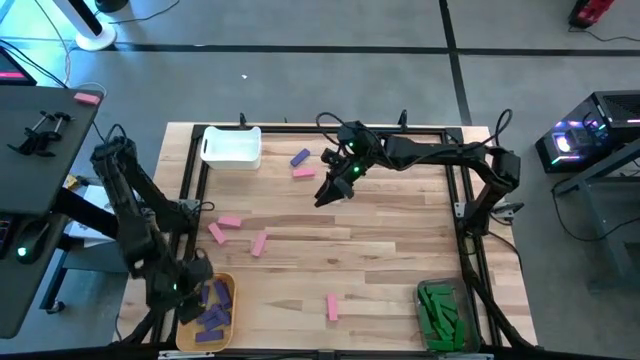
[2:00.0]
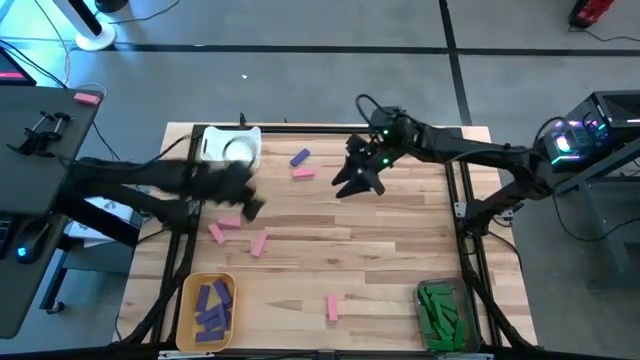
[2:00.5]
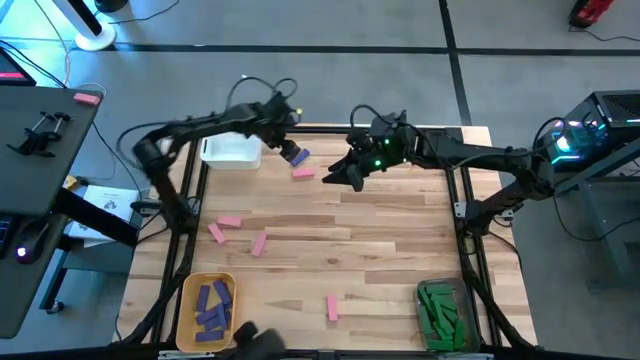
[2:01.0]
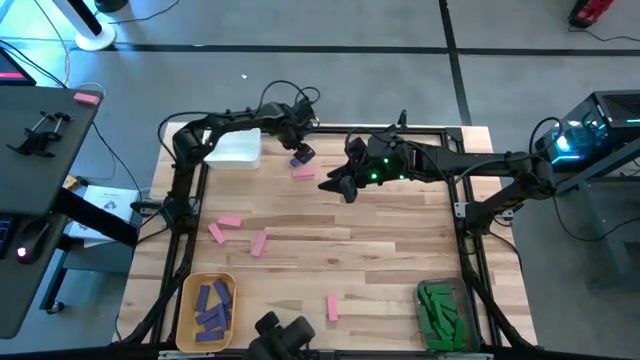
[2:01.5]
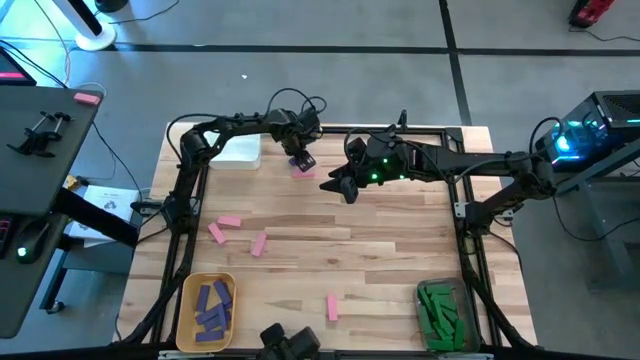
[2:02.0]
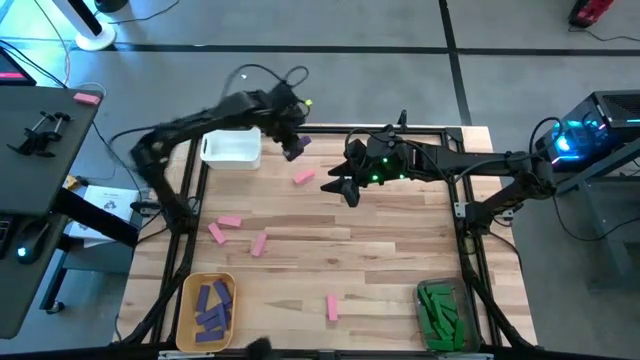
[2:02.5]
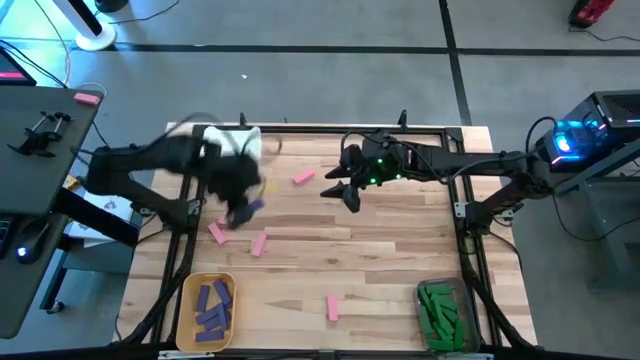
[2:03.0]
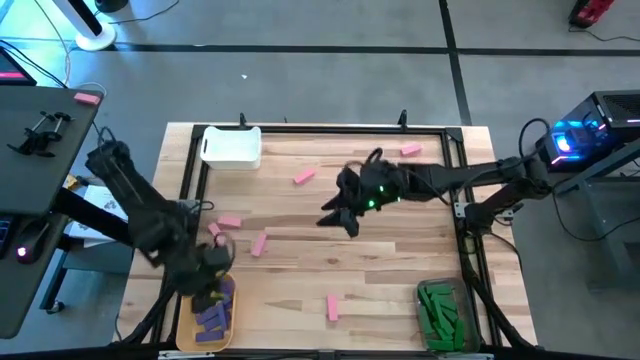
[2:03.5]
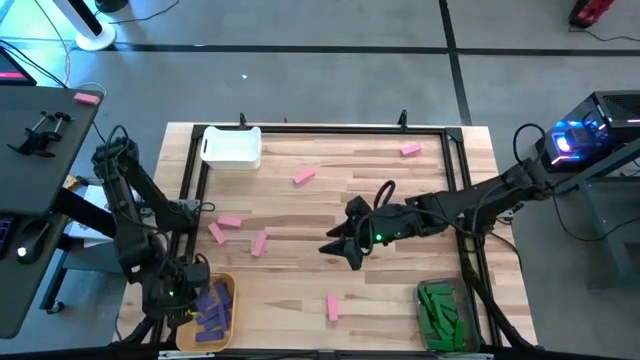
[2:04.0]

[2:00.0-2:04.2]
Task: Sort blocks
Put the blue wooden block into the yellow bin

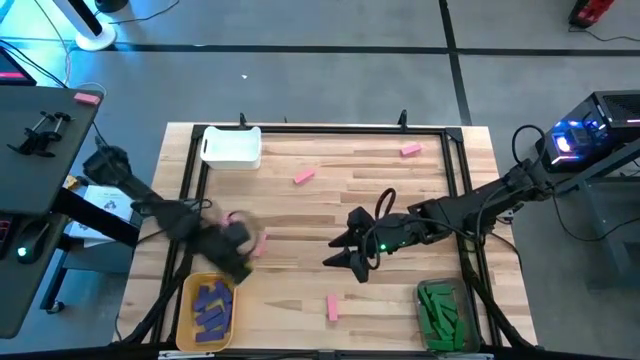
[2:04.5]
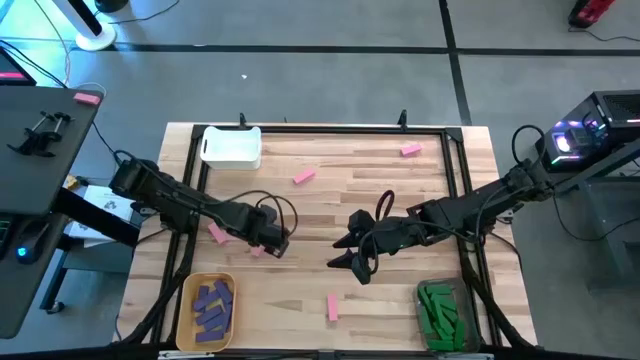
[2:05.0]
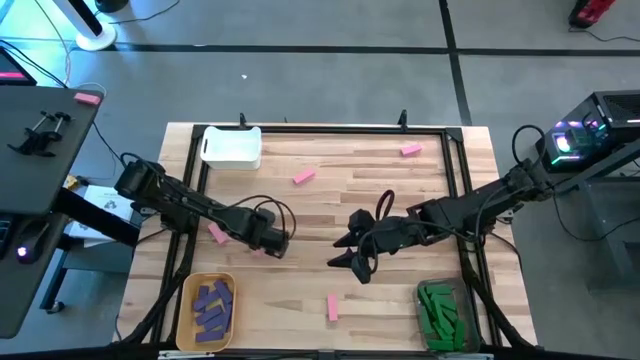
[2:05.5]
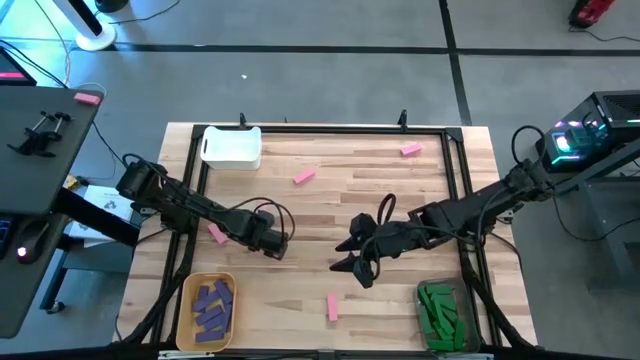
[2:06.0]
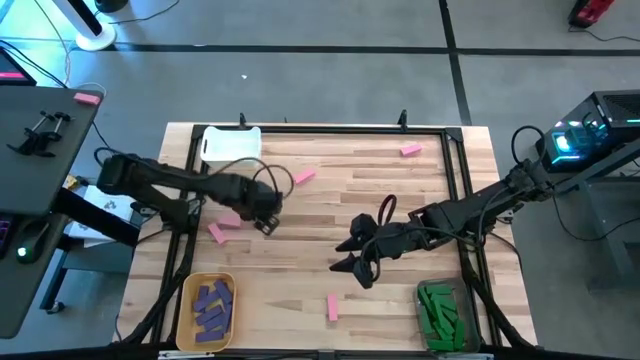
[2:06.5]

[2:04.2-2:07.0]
Put the pink wooden block into the white bin

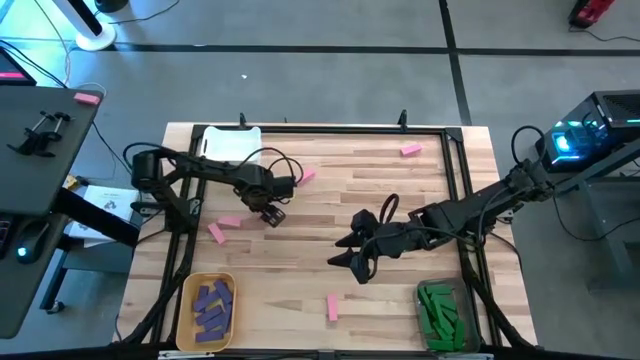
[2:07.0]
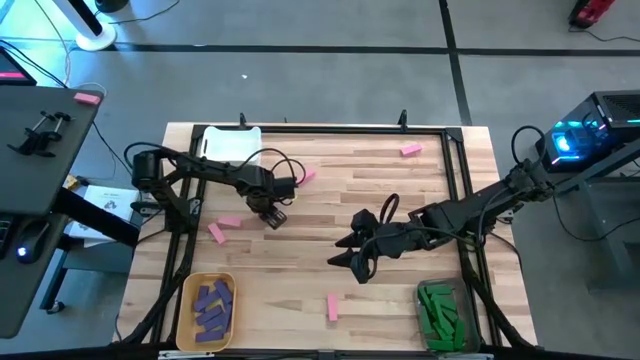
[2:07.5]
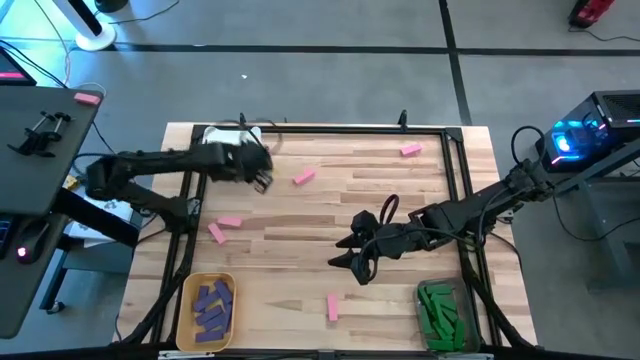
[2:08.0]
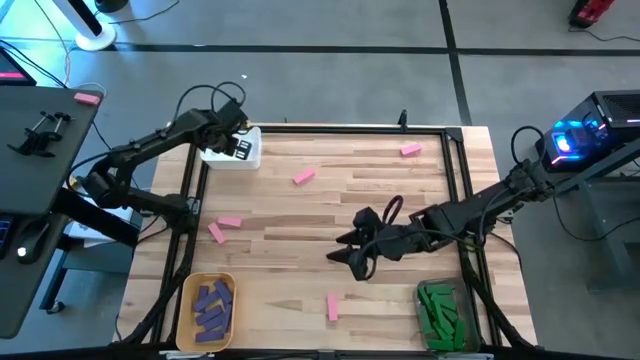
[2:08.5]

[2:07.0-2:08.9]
Put the pink wooden block into the white bin

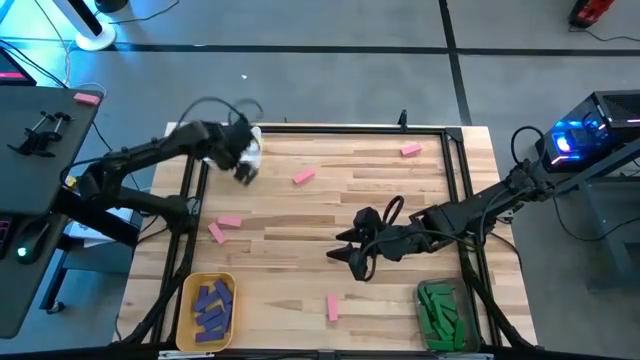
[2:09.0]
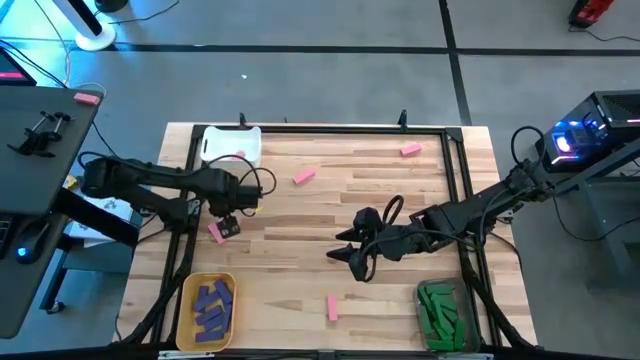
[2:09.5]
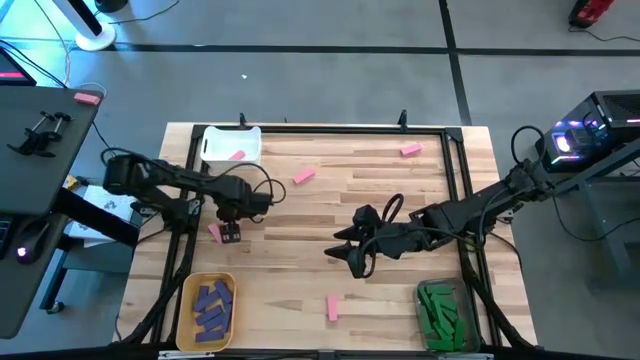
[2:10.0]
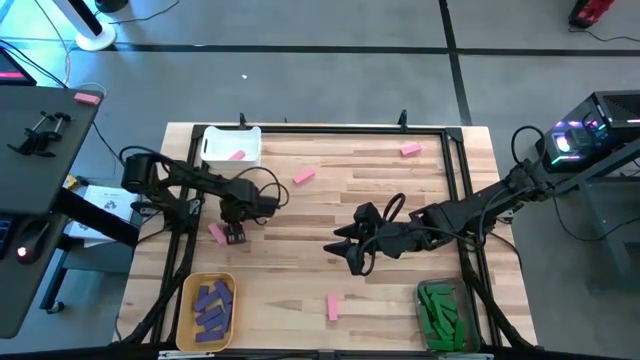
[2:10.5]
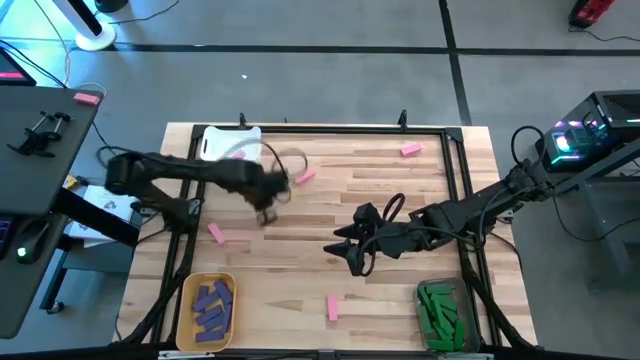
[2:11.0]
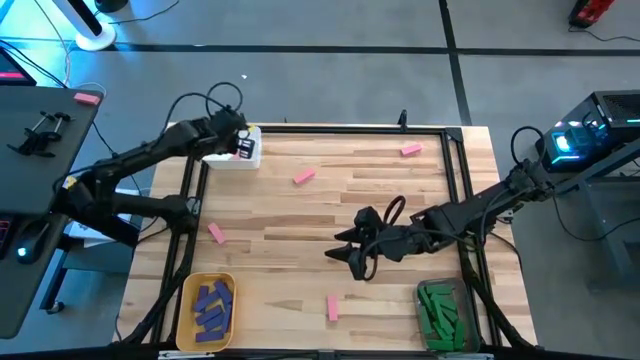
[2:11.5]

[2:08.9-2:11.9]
Put the pink wooden block into the white bin

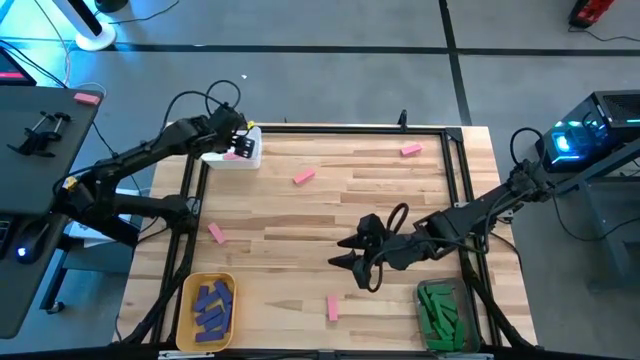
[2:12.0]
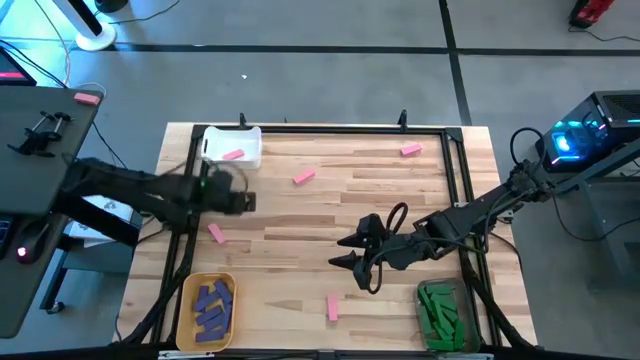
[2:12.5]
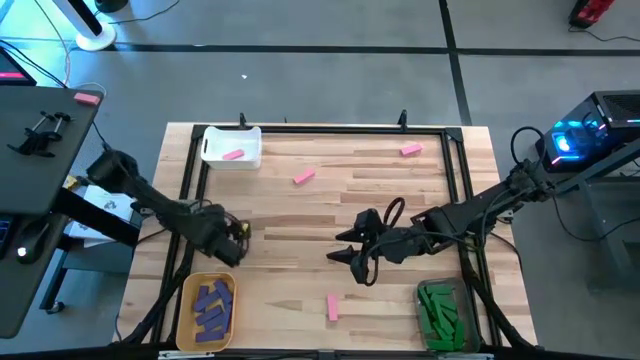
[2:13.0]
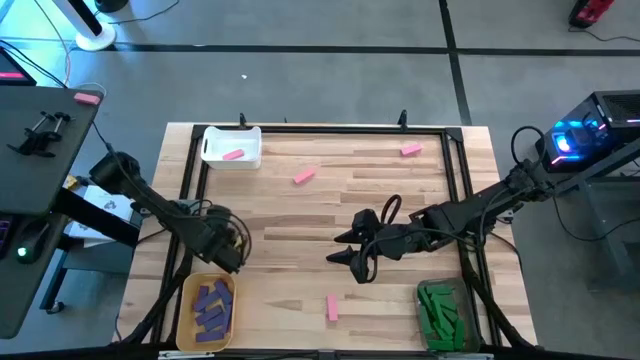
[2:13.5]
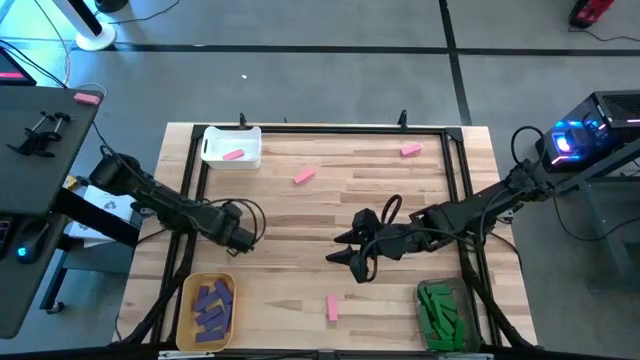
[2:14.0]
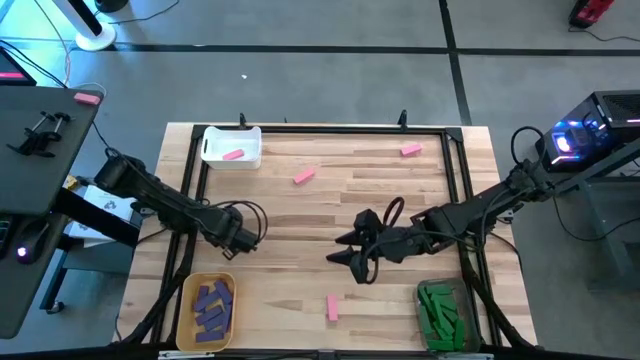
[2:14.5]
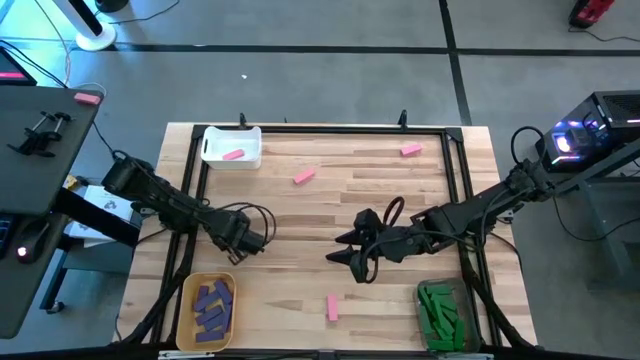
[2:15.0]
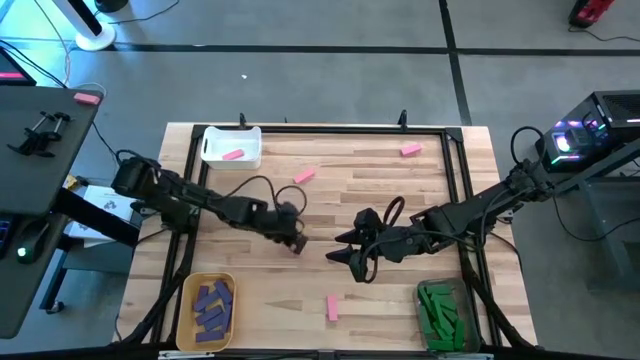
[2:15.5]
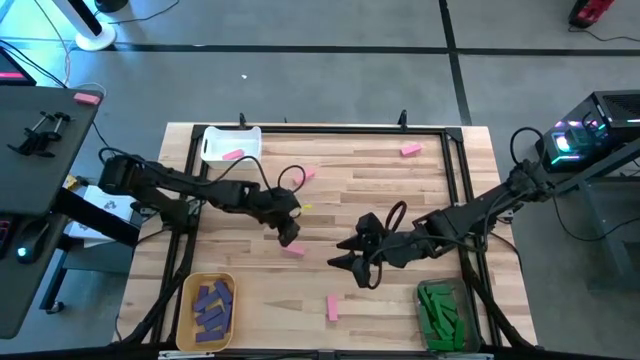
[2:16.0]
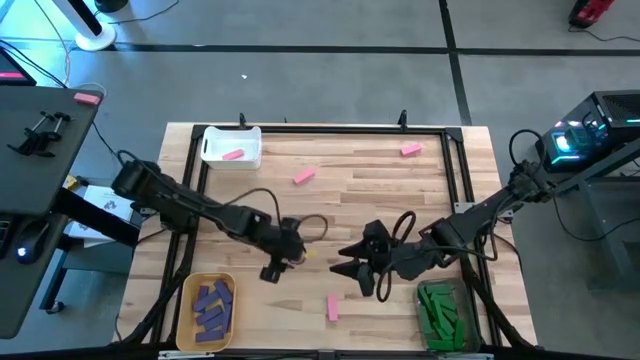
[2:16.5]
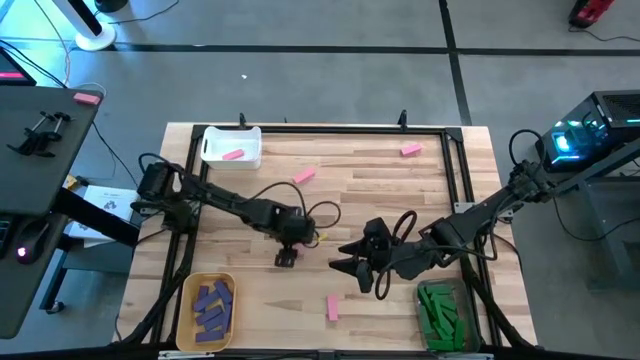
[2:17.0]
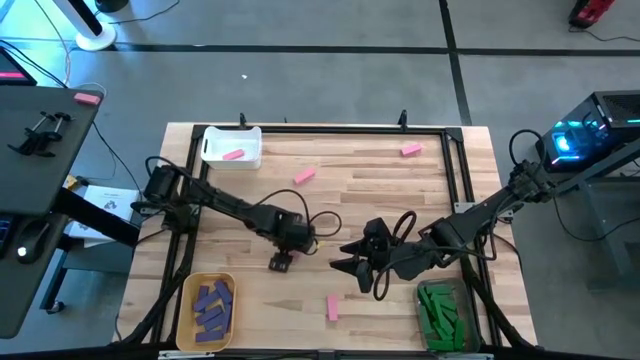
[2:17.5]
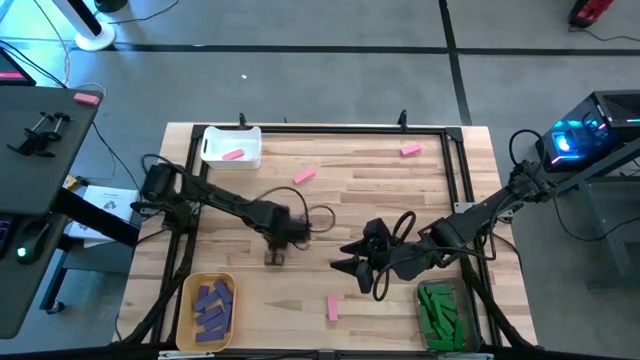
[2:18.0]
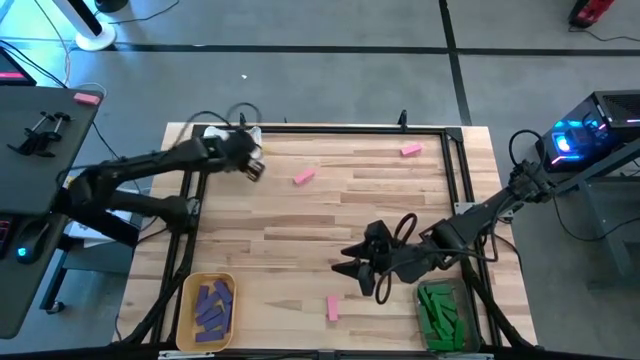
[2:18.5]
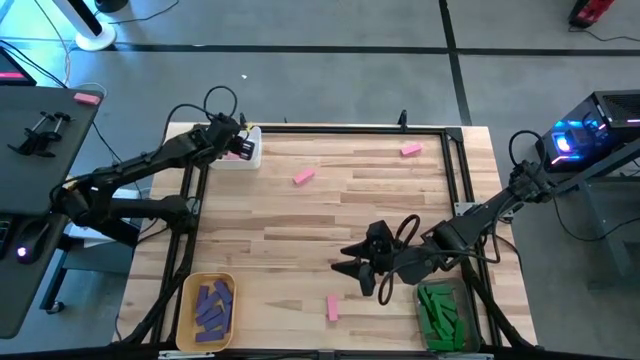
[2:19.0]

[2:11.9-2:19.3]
Put the pink wooden block into the white bin

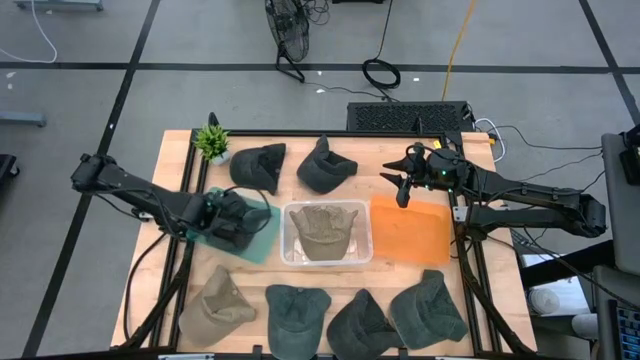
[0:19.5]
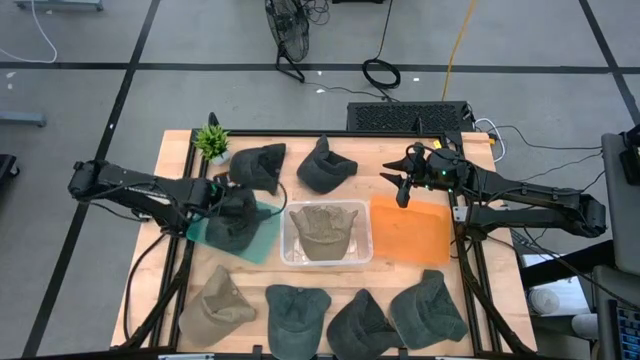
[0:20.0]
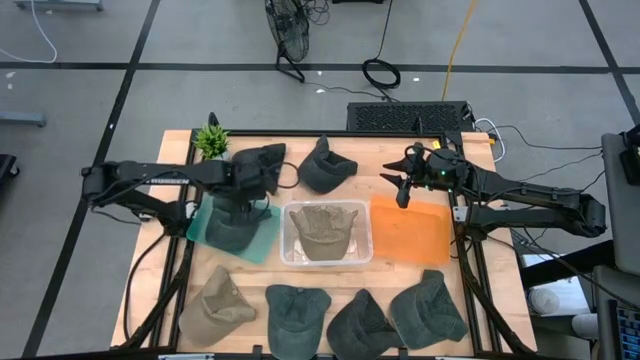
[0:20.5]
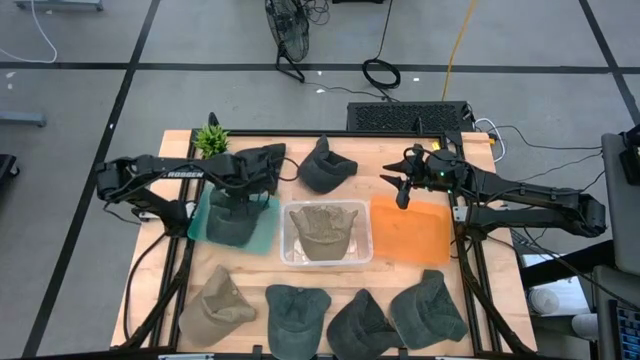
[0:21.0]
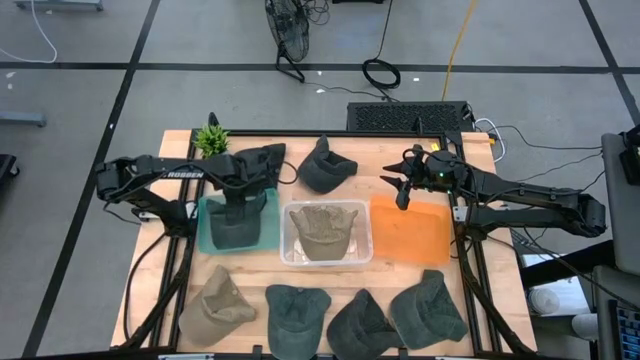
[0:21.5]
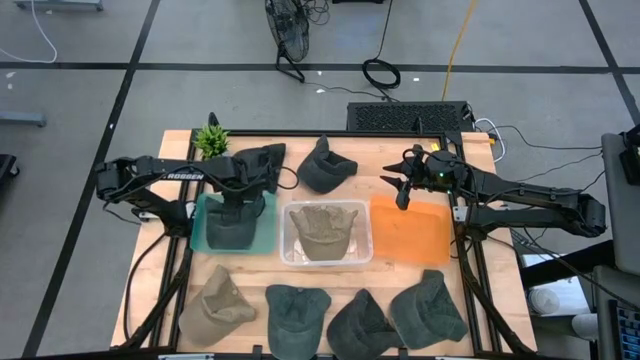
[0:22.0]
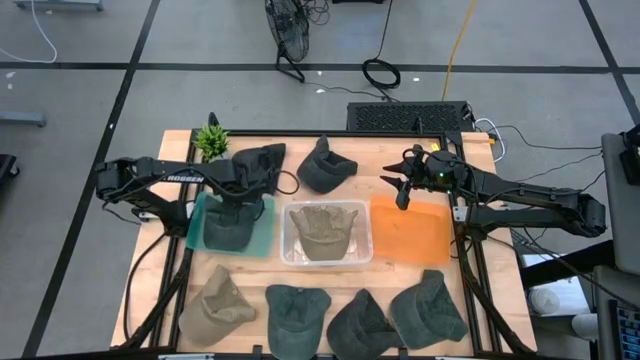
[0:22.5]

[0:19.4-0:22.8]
Task: Pick & Place hat
Adjust the green bin
